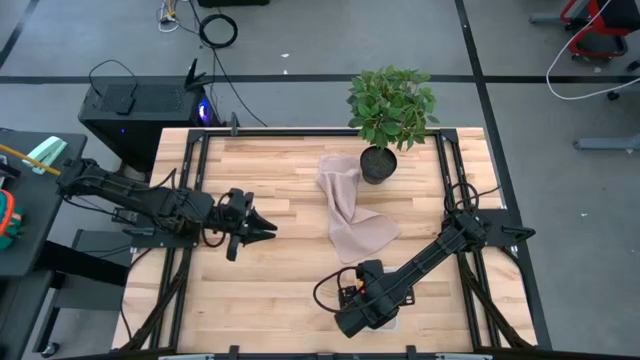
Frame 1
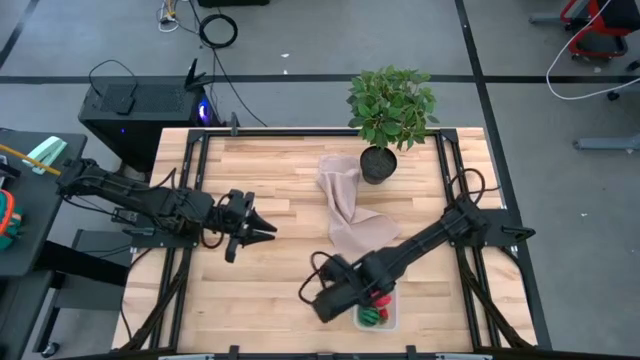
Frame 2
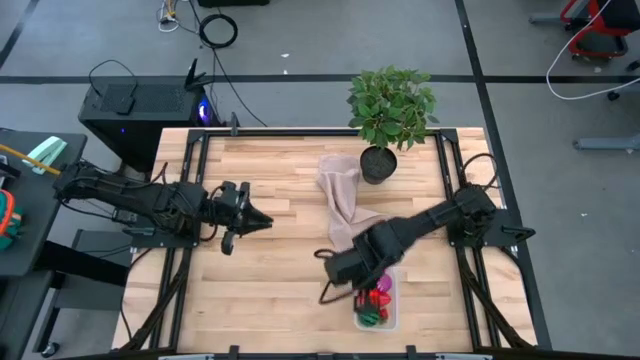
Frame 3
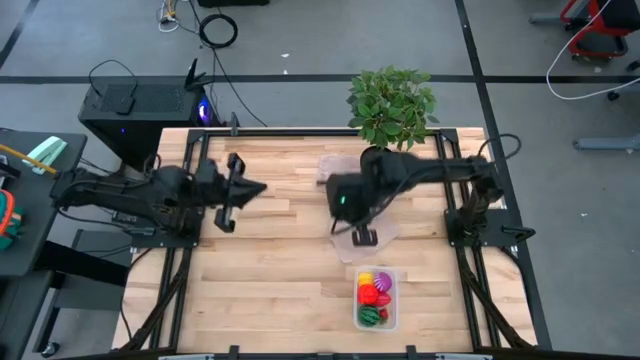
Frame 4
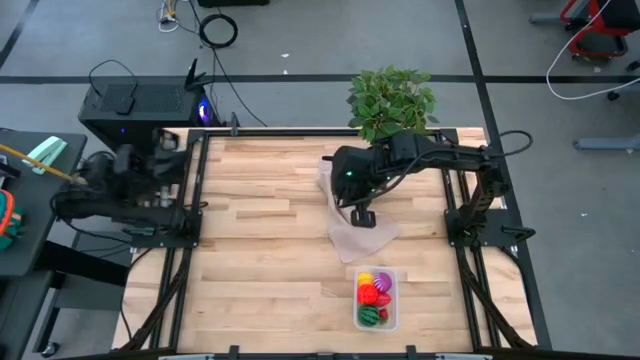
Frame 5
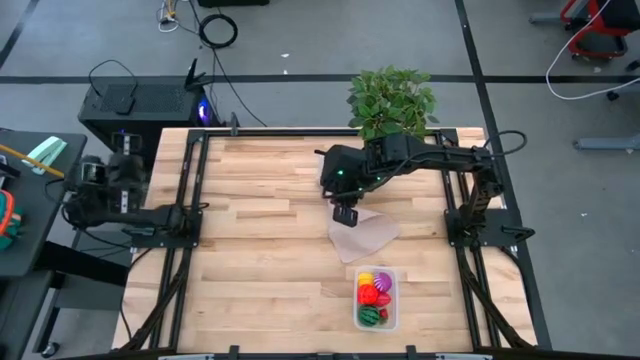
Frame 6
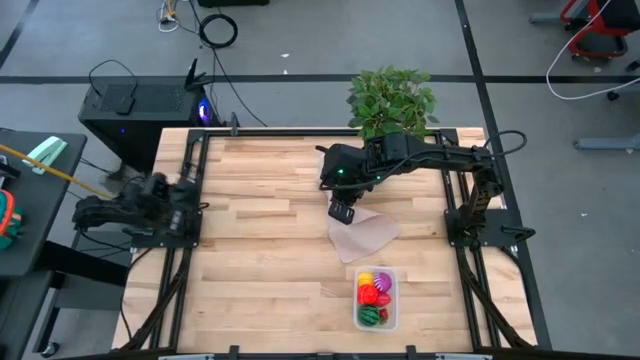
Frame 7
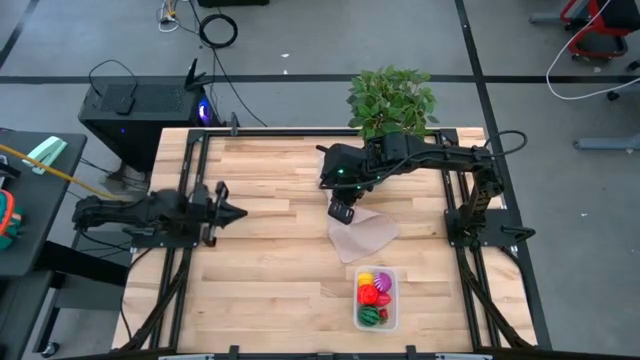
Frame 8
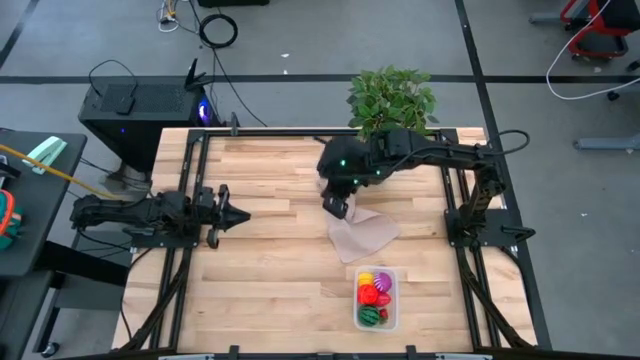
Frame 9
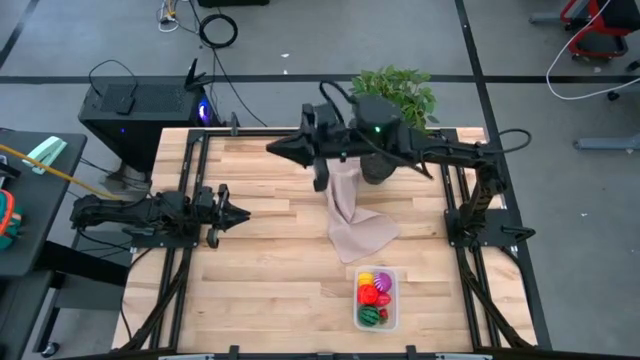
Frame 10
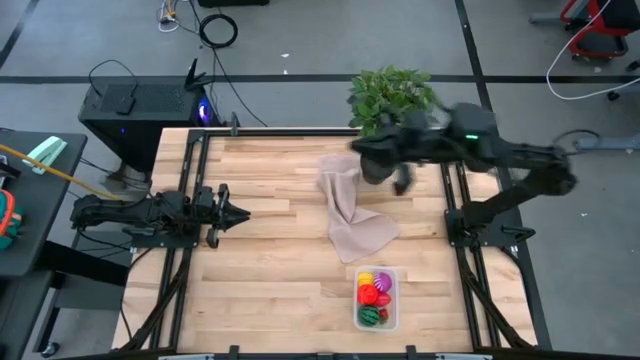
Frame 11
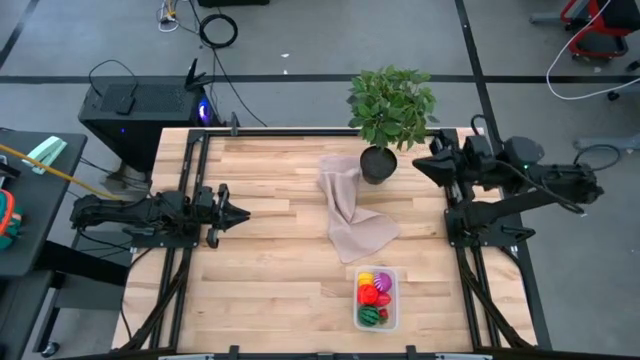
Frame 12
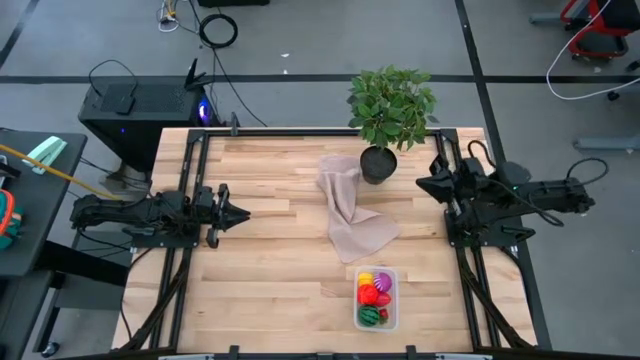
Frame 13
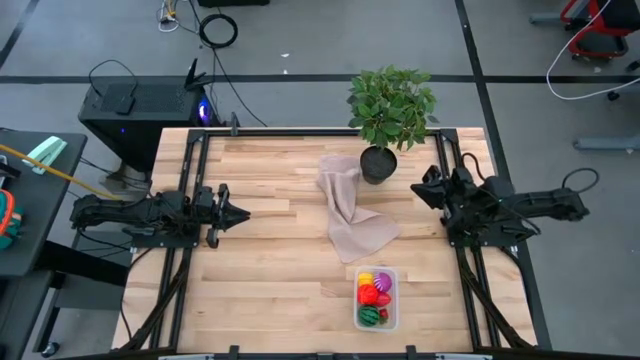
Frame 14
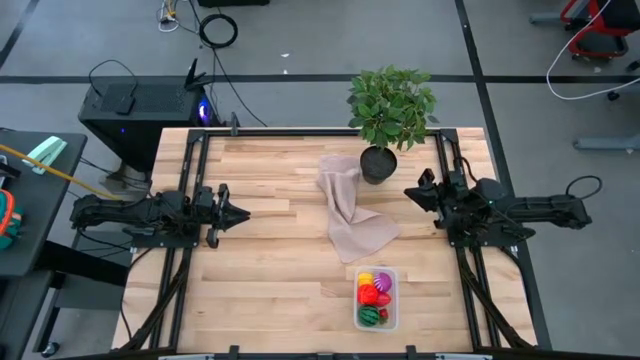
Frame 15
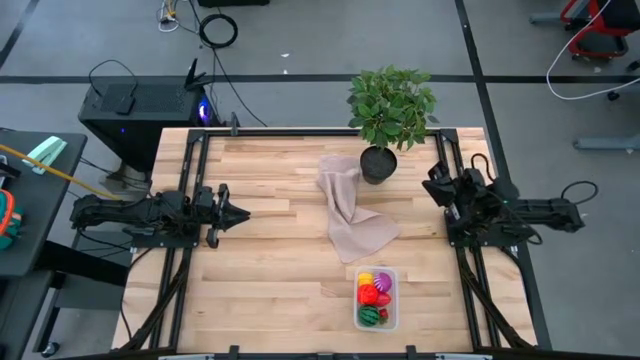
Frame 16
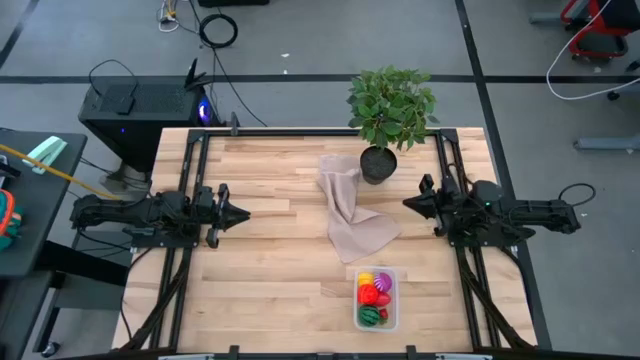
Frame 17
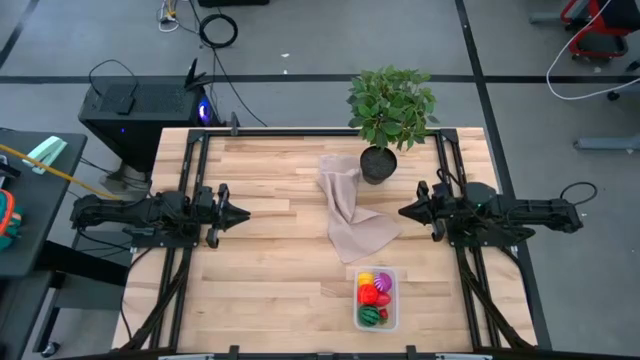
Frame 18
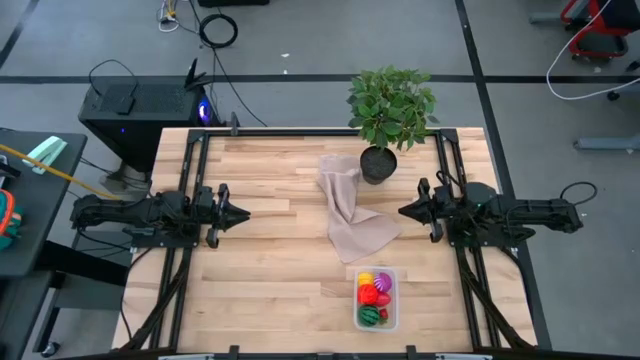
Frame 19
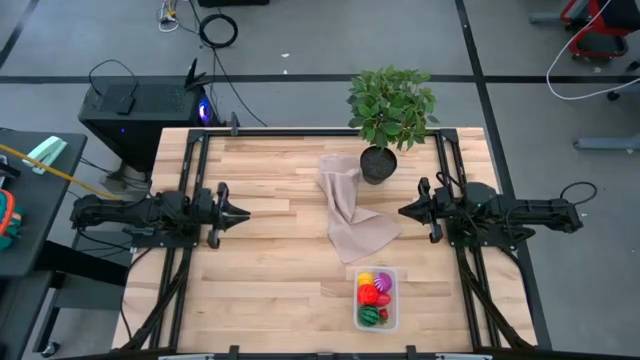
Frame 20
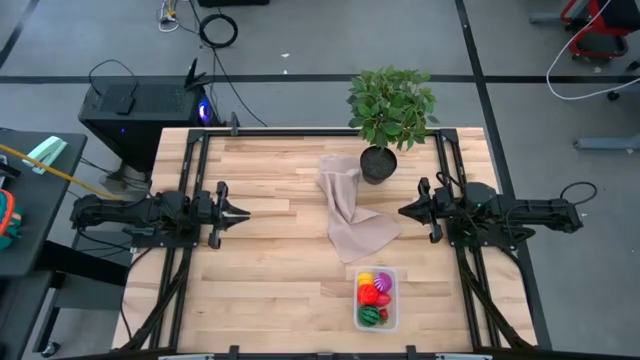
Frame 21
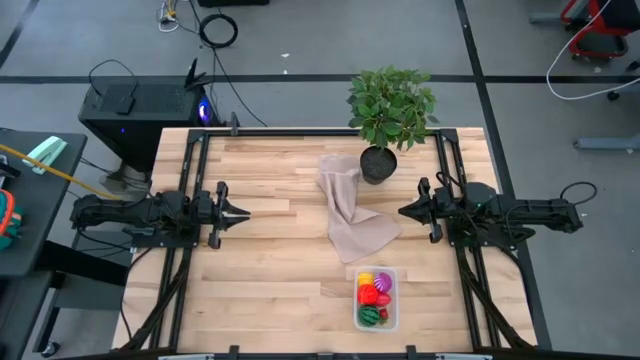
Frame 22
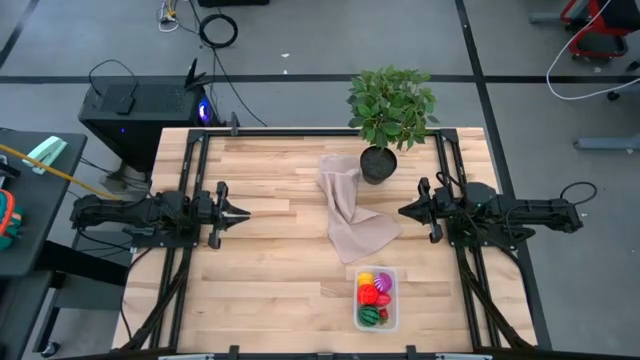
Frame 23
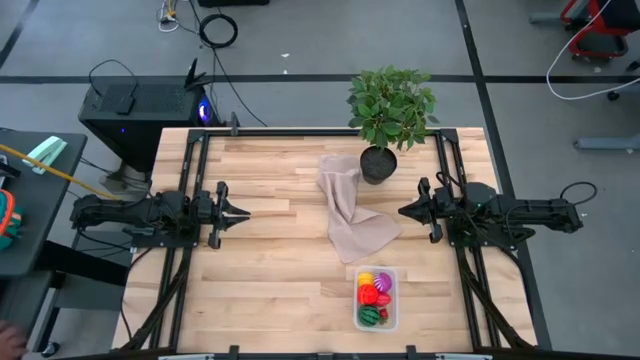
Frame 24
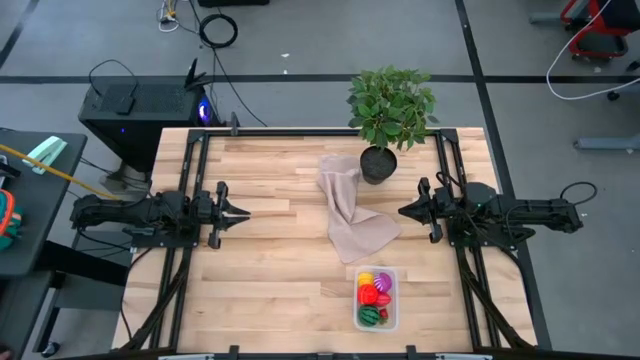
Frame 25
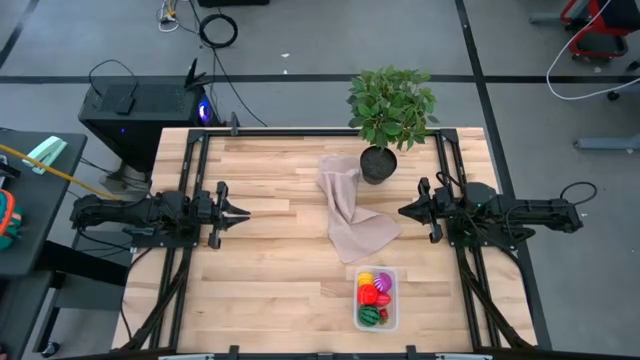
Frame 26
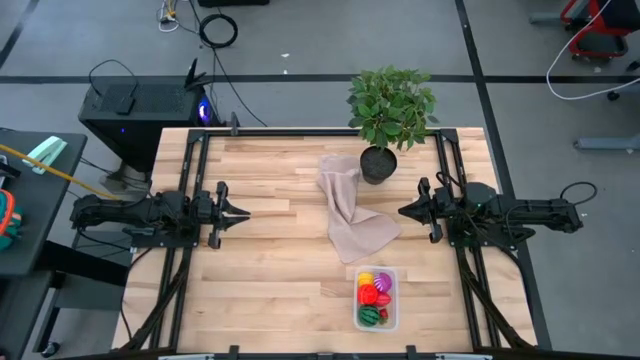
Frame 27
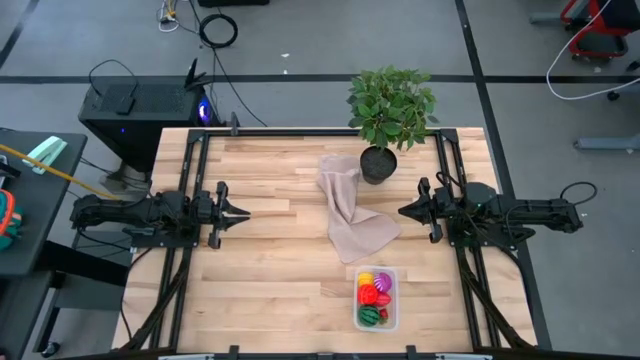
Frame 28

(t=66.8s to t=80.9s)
Task: Pick and placing Produce into tupperware
Return to Home Position

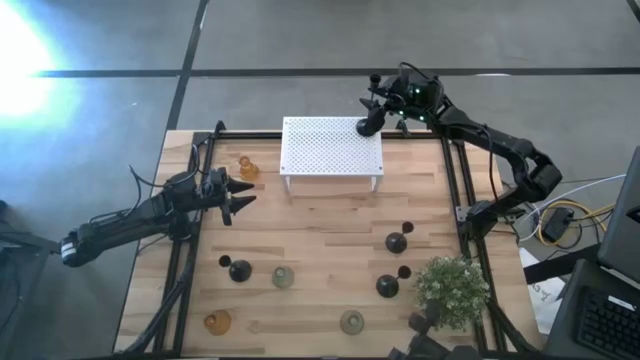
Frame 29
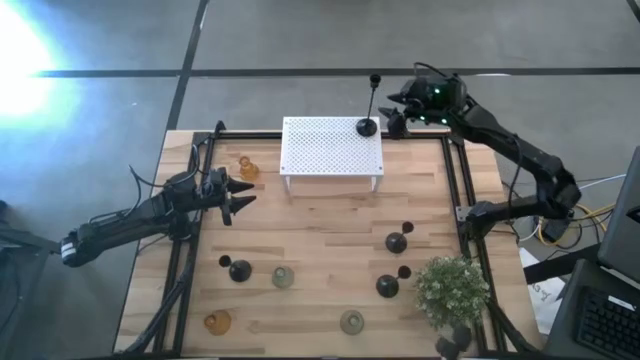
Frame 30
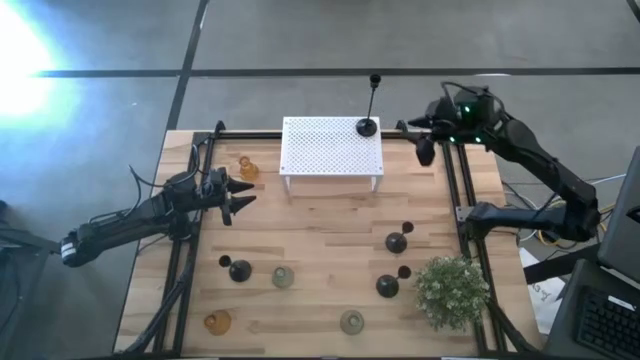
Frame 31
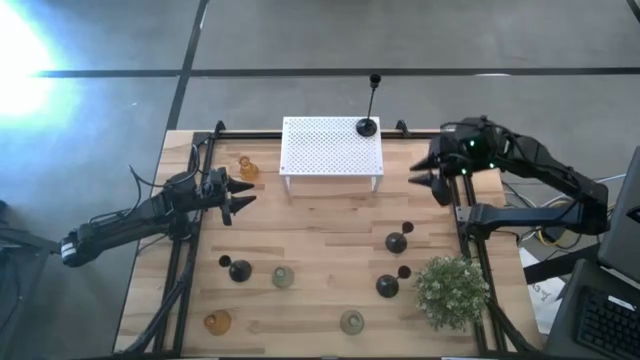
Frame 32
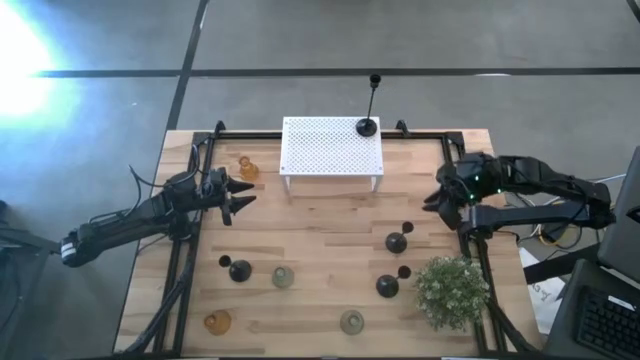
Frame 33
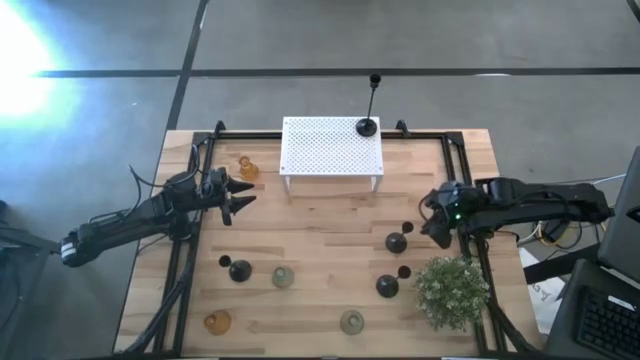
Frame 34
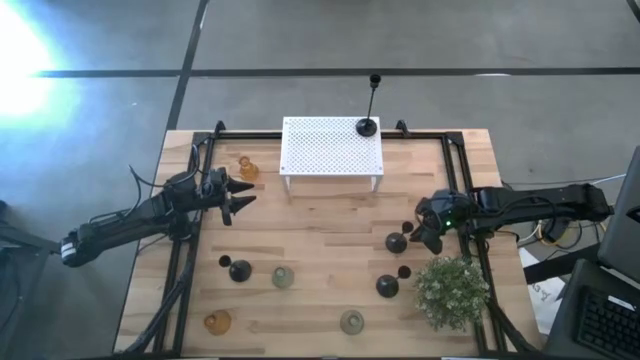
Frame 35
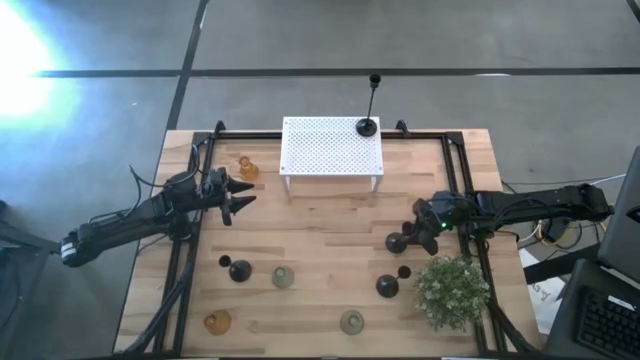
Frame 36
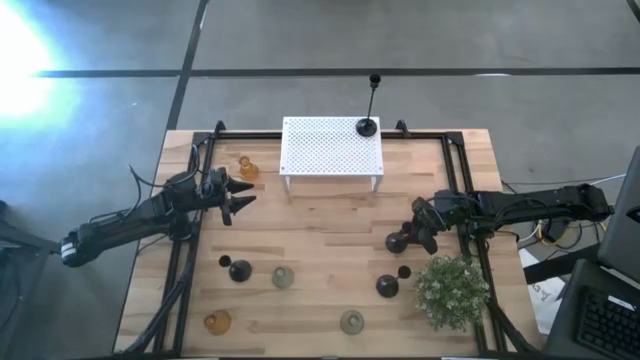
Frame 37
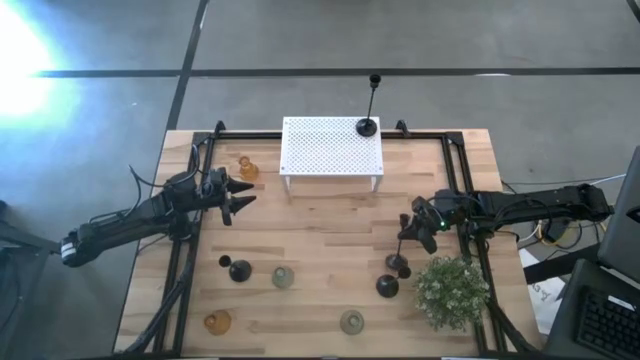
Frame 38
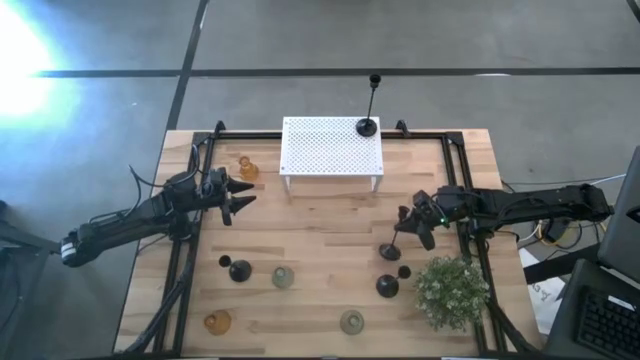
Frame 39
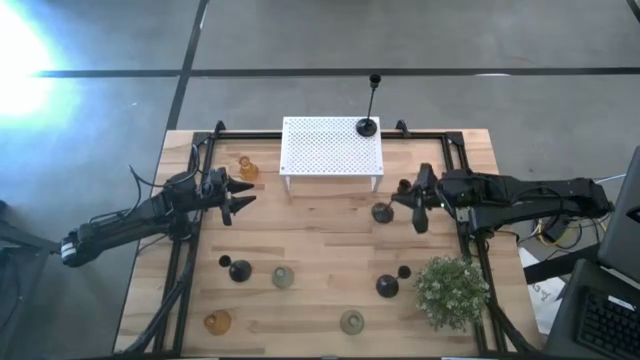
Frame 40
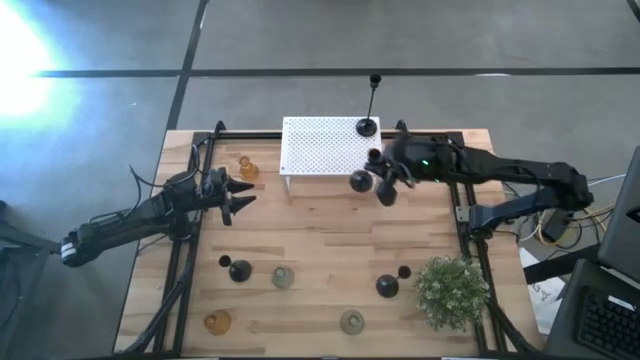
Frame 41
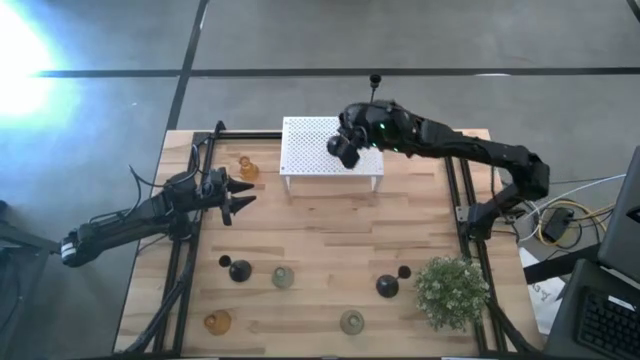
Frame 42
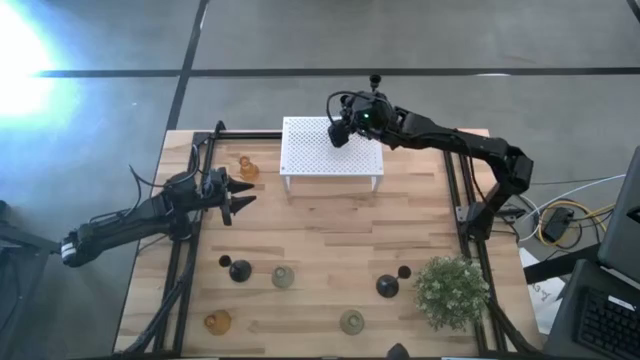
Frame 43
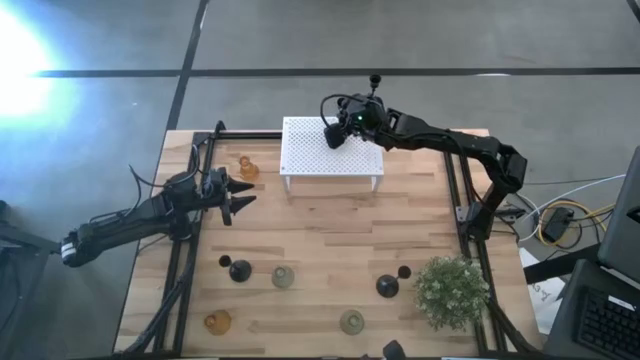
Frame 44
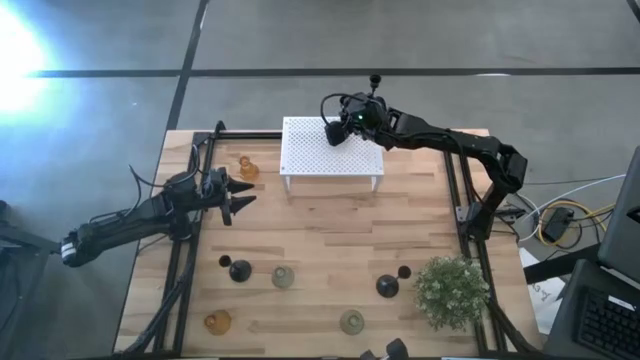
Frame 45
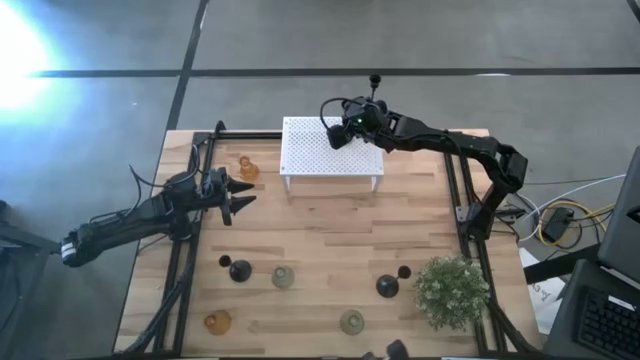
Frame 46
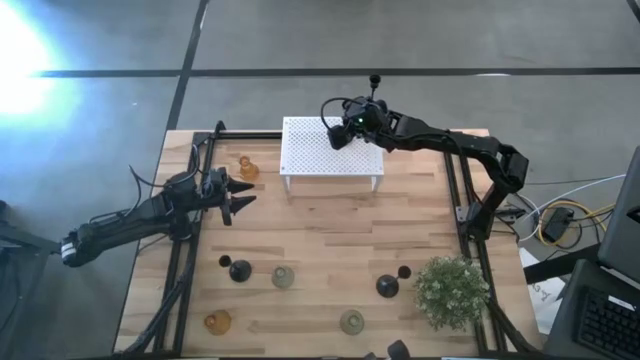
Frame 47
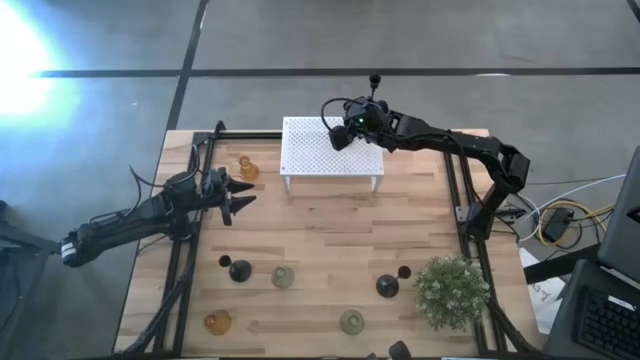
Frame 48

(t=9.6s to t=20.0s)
Task: Pick & Place candle stick holders
Put the black candle holder on the shelf
